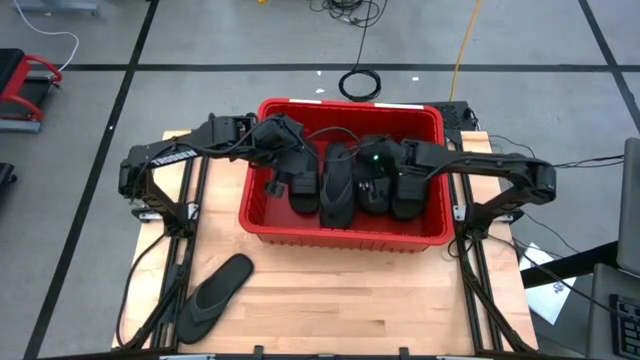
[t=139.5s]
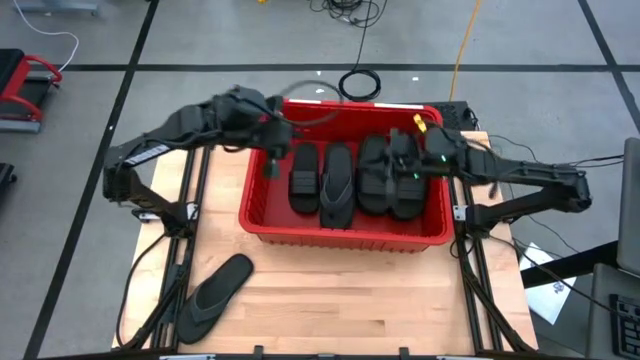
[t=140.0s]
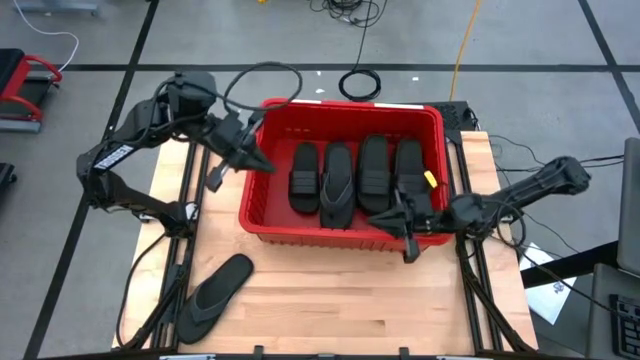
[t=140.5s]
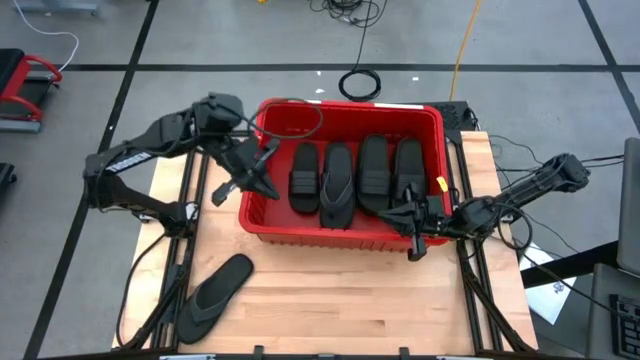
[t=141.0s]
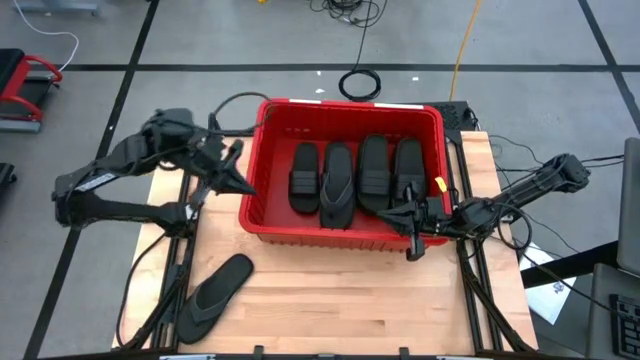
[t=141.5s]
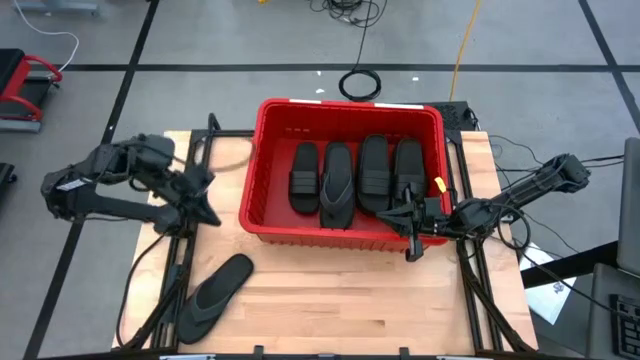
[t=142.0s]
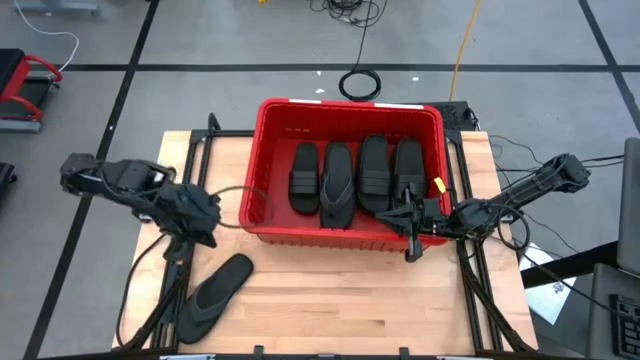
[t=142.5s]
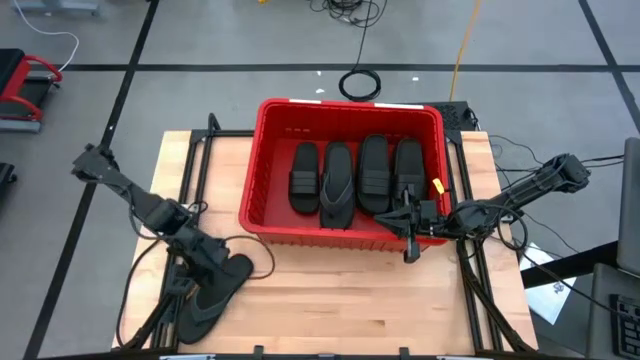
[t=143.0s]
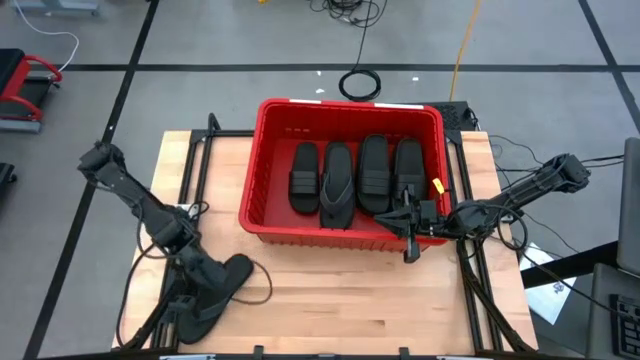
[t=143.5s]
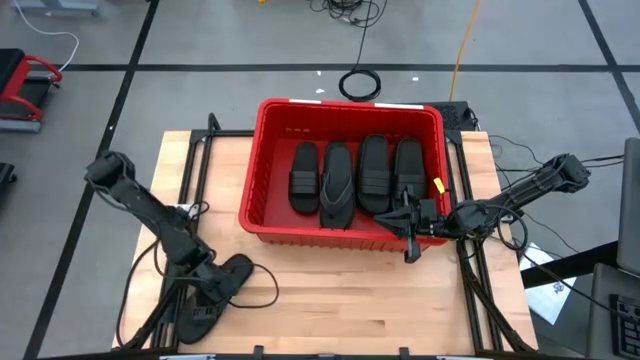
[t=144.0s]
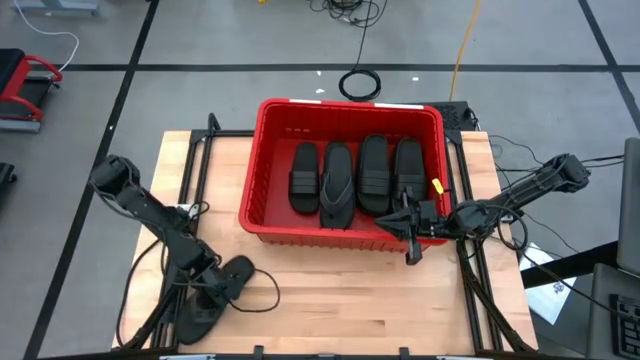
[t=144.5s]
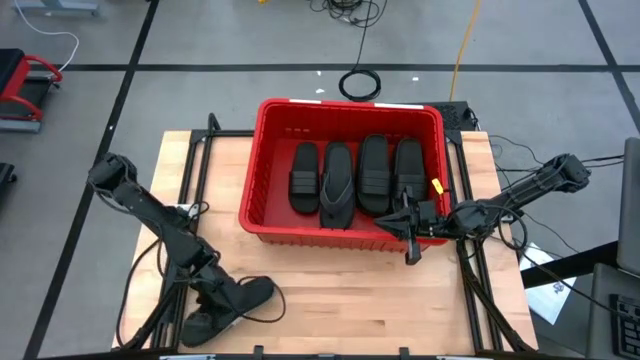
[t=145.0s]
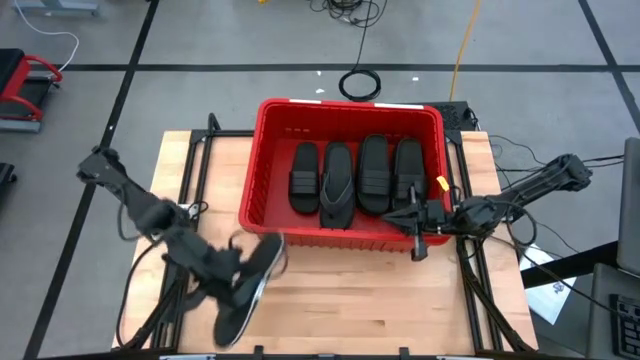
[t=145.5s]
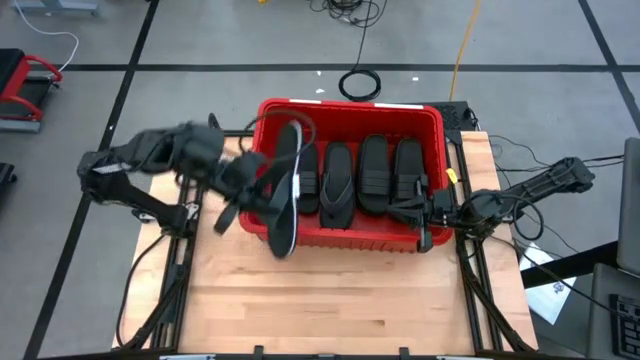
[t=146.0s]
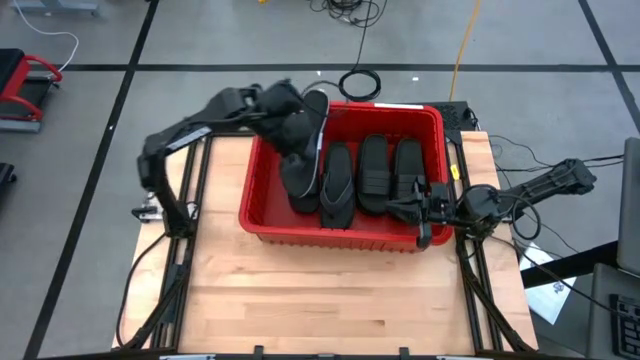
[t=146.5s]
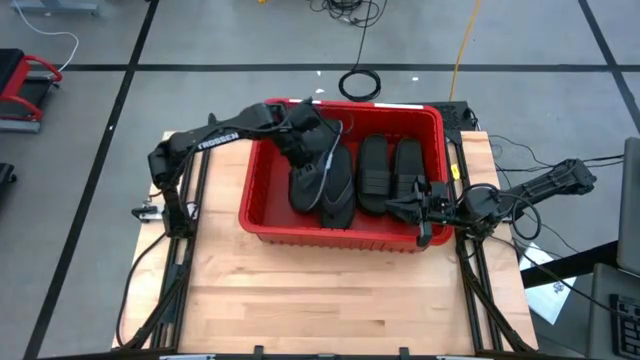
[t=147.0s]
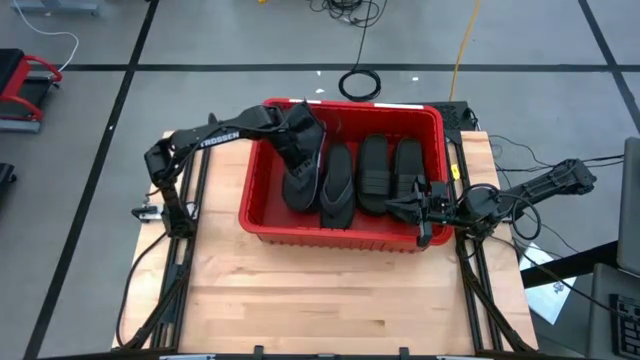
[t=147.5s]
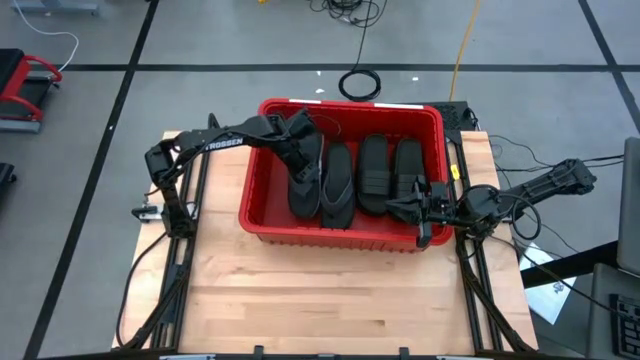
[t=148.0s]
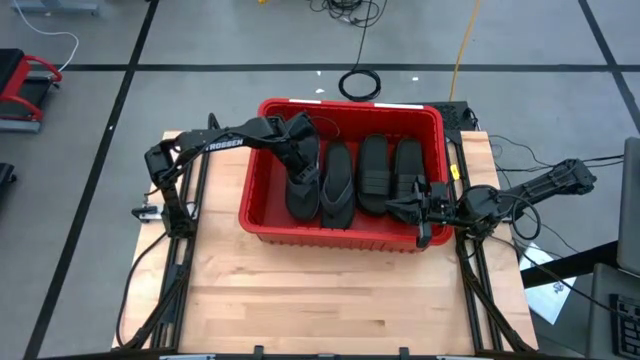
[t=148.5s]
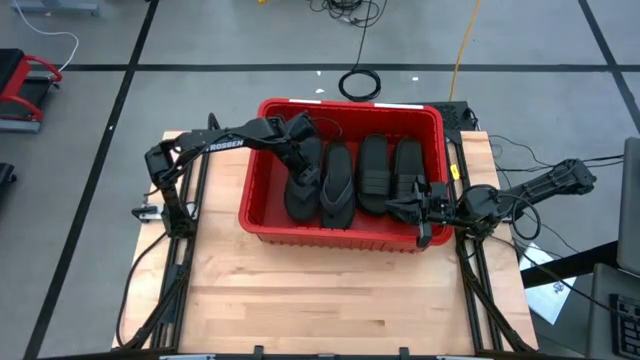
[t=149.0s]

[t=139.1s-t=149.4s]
Task: Pick and place slides into bin
Put the black slipper into the red organizer bin

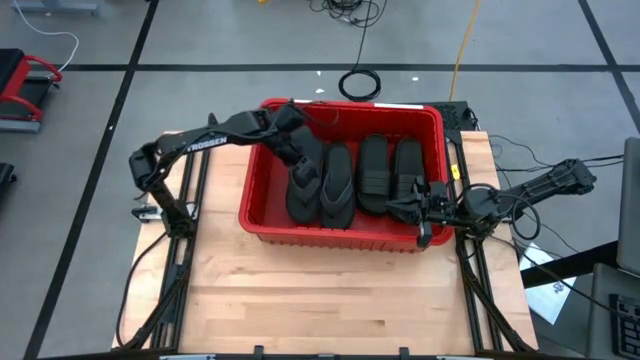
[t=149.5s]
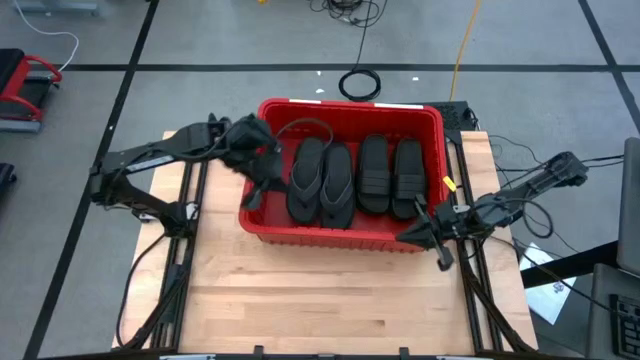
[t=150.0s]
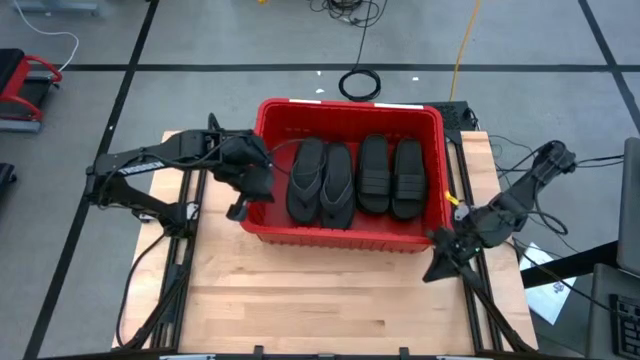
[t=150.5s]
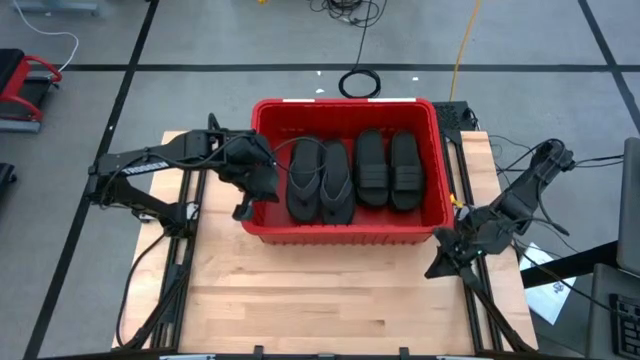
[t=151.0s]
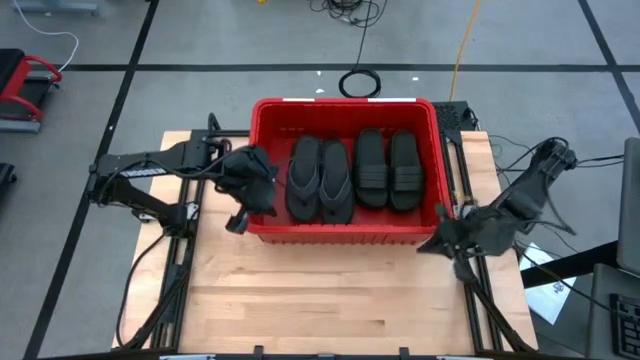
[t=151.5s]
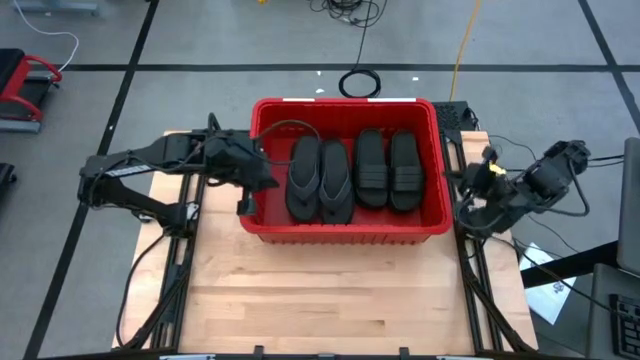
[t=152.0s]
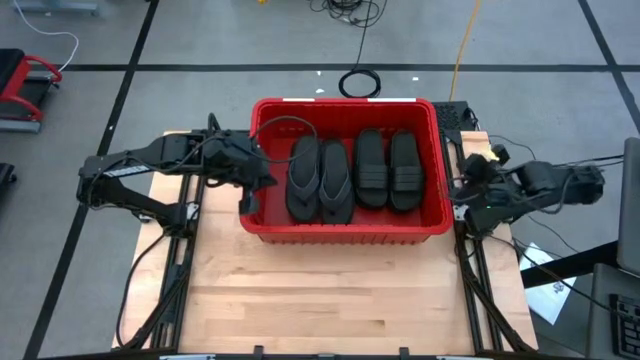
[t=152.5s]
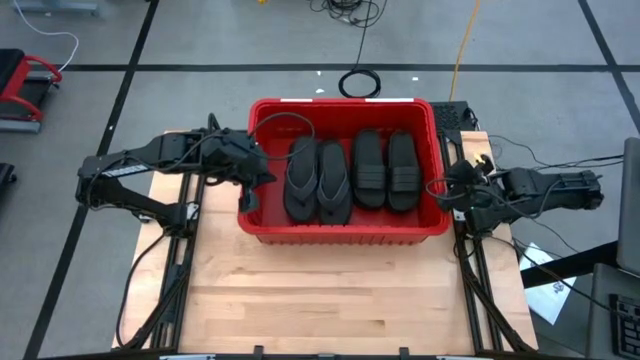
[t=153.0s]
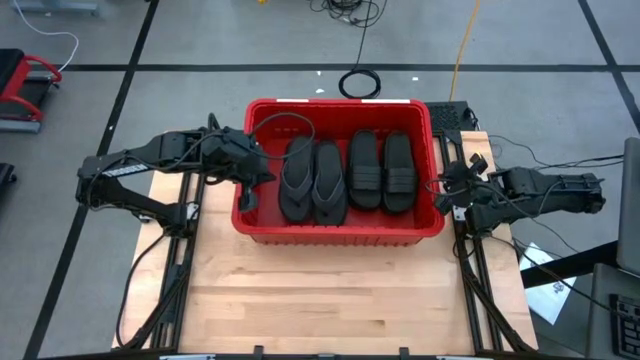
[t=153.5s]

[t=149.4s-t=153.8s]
Adjust the red organizer bin

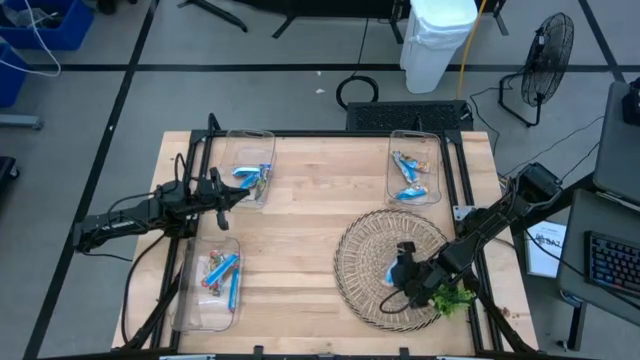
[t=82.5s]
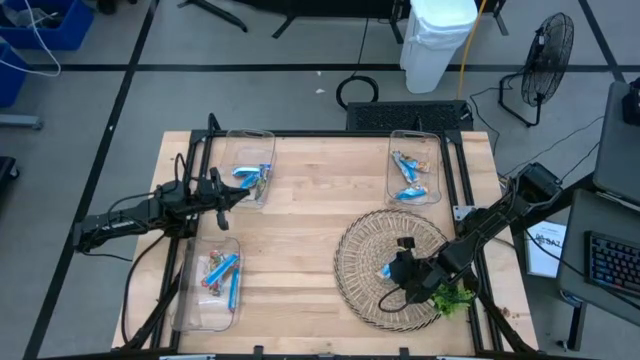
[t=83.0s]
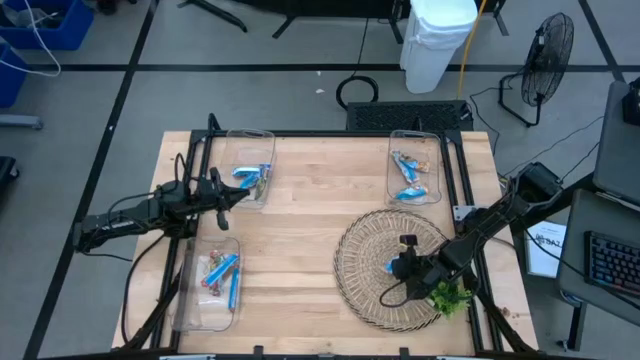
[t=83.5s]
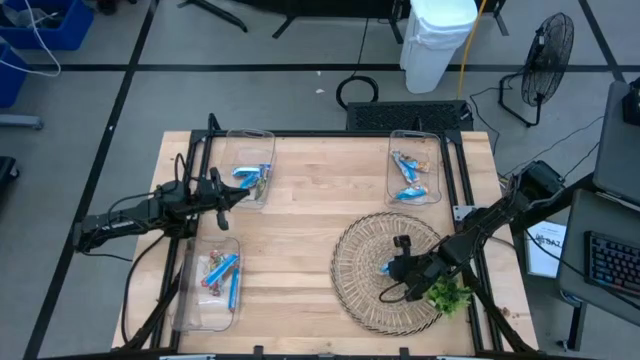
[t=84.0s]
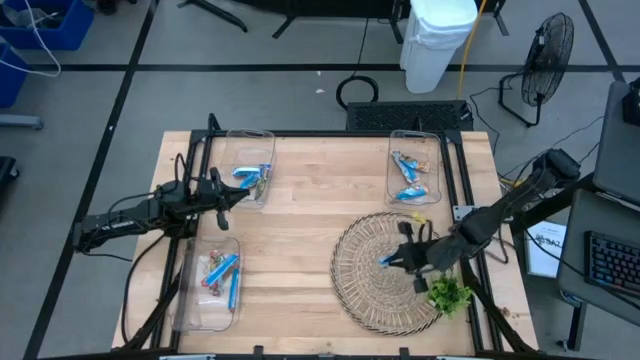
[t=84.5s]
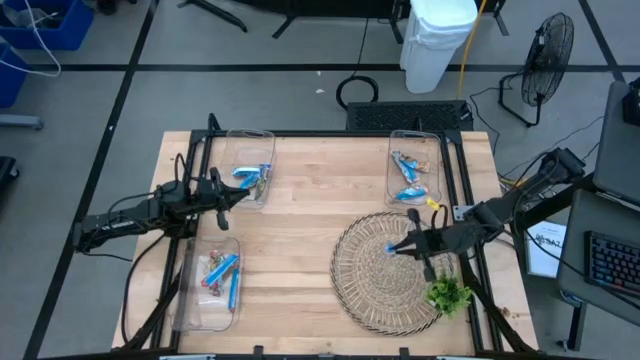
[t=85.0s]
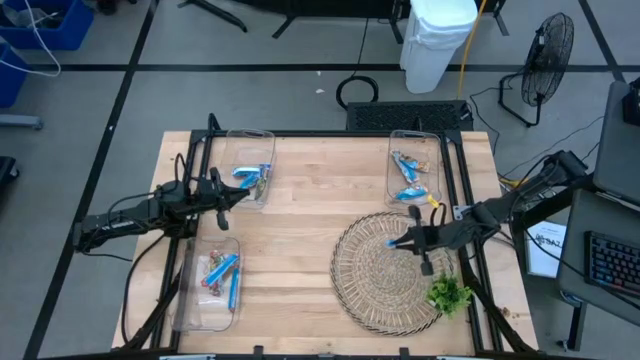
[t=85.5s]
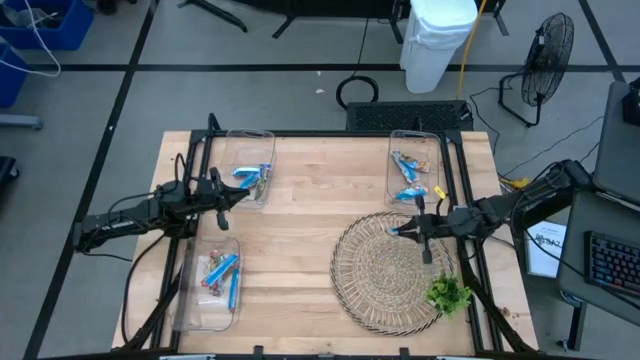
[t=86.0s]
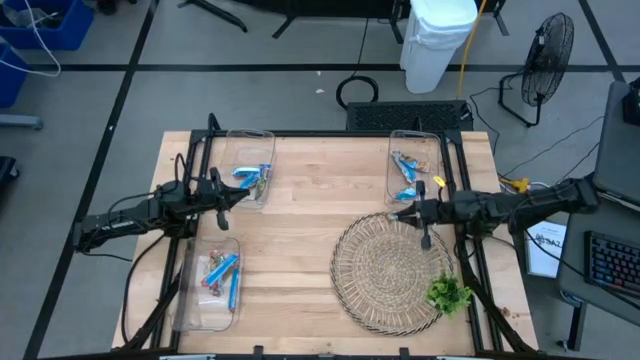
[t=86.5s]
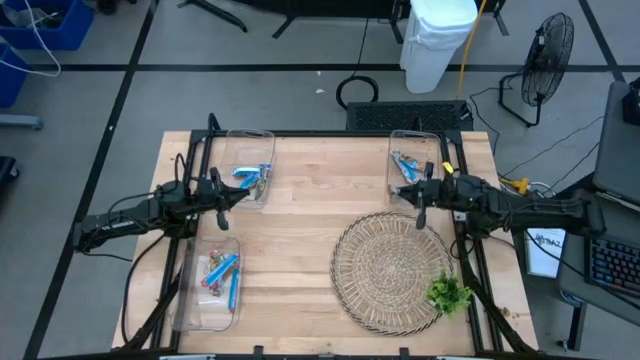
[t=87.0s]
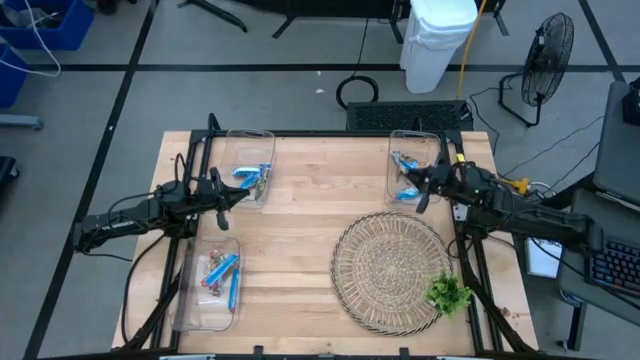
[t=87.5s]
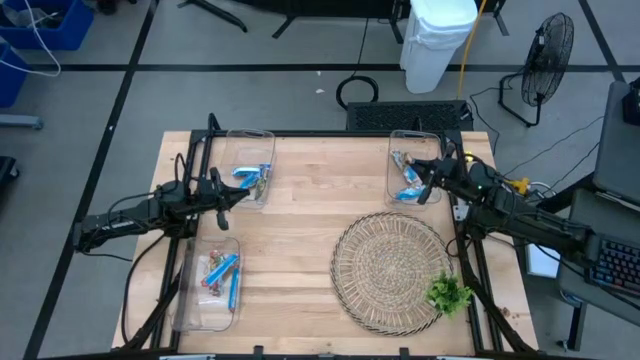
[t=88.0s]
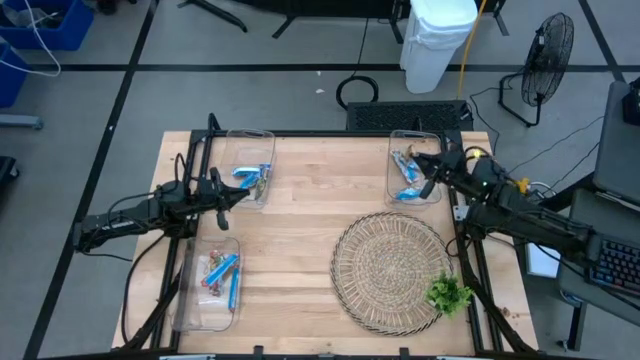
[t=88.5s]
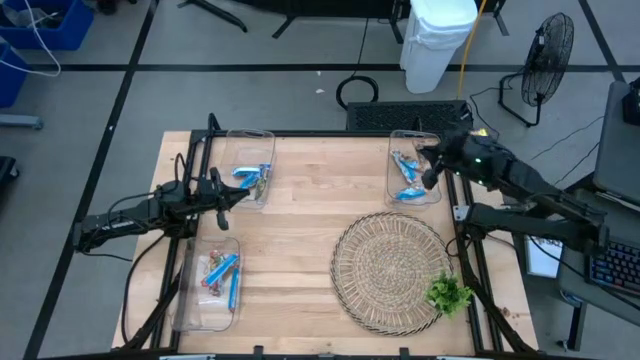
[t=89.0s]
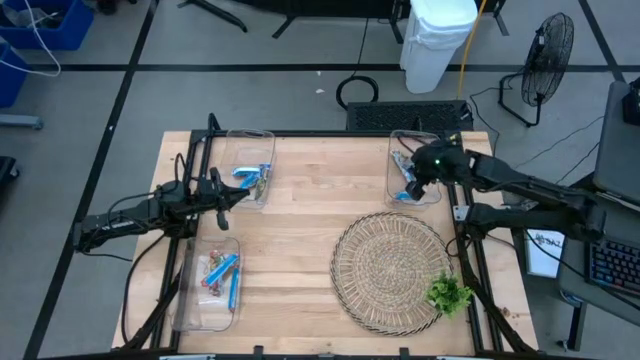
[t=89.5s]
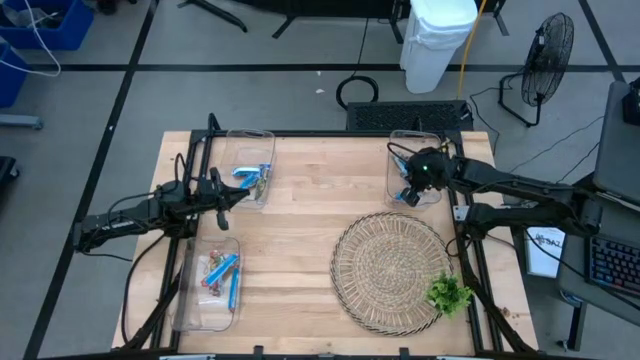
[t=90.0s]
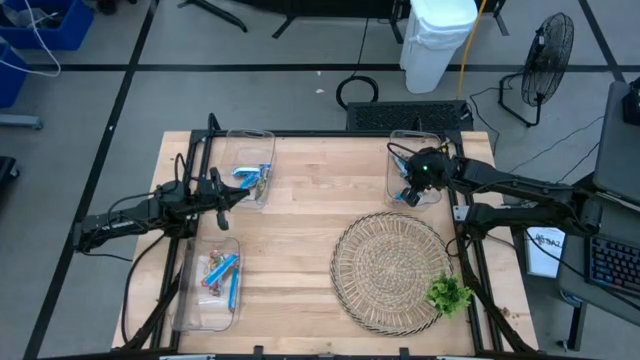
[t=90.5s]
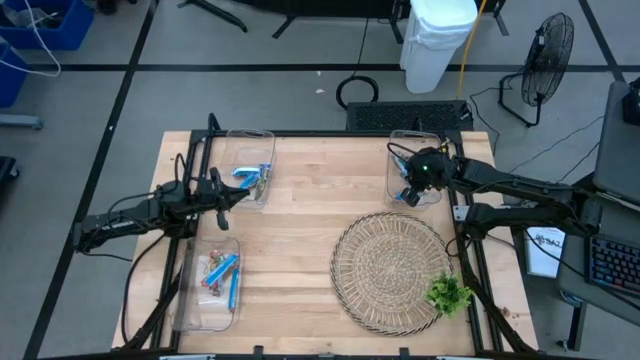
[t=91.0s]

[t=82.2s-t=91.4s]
Task: Pick and place Granola Bars by type
Put the yellow granola bar into the top right transparent bin
